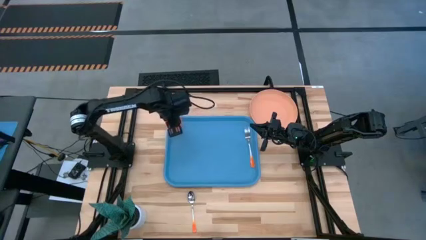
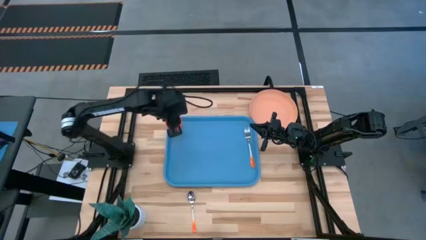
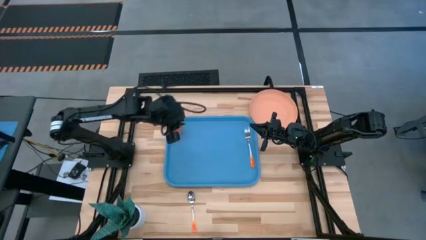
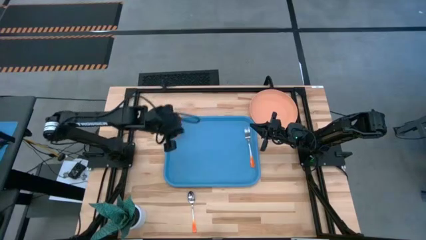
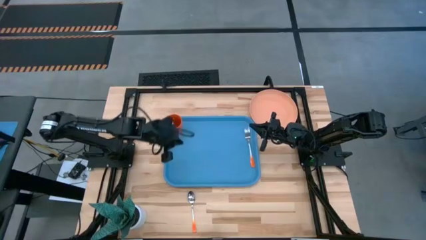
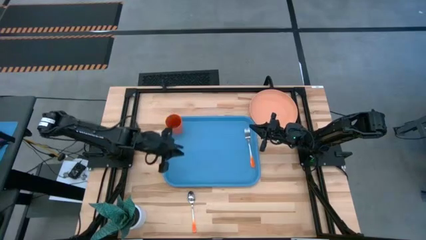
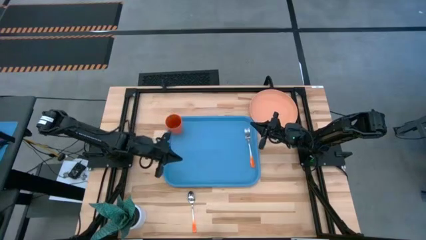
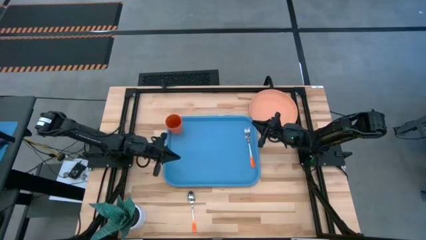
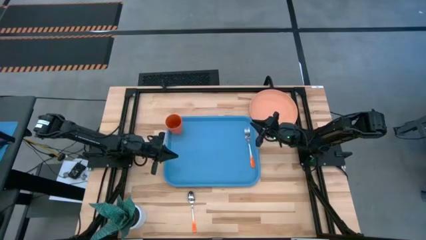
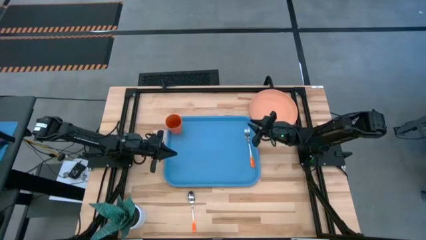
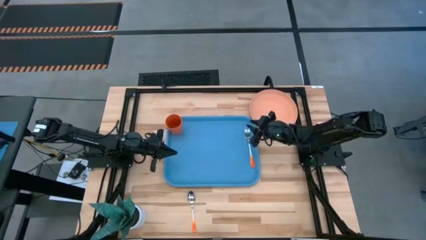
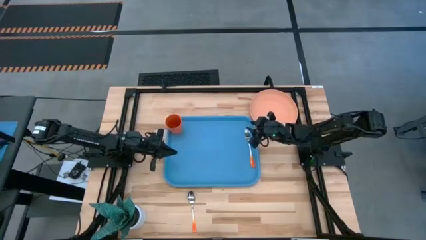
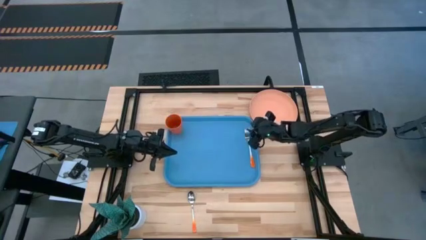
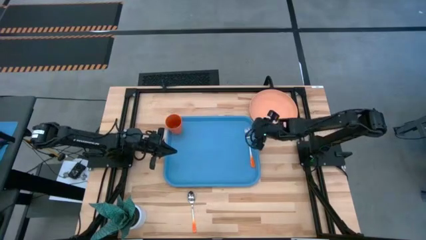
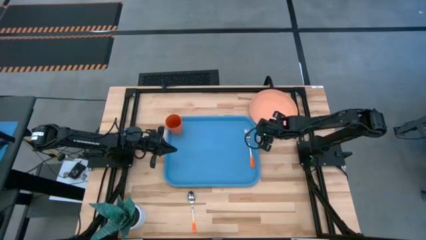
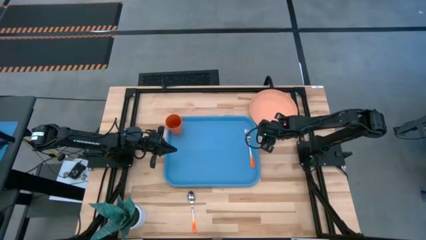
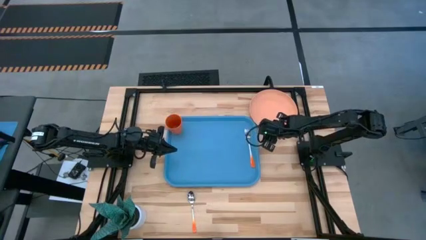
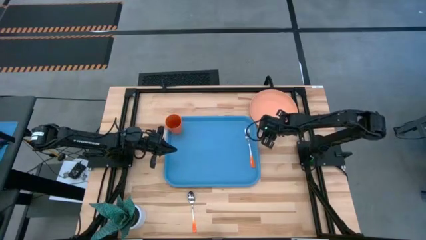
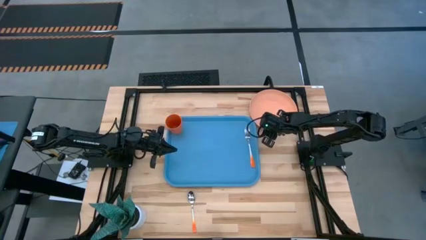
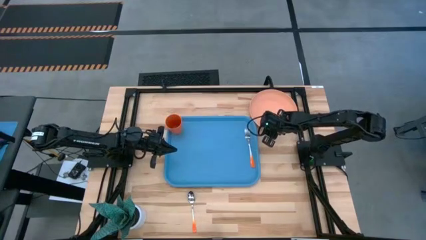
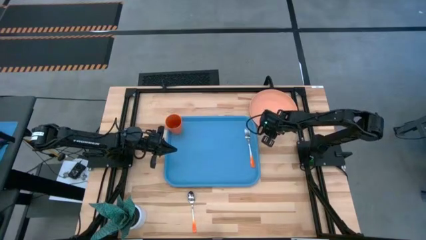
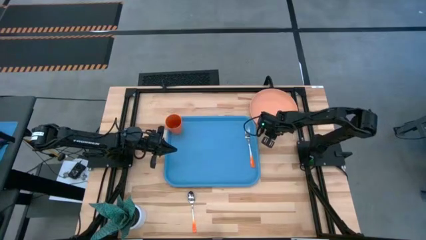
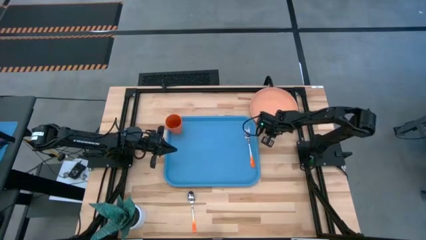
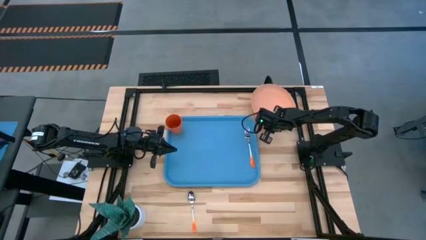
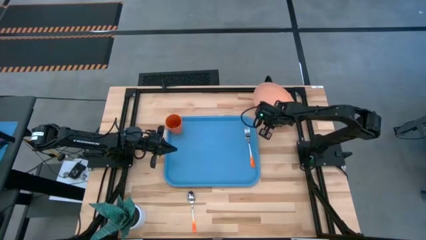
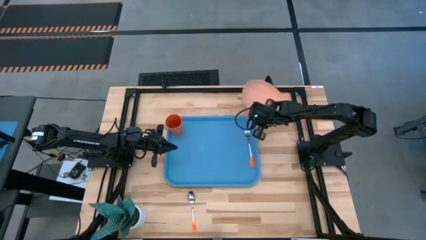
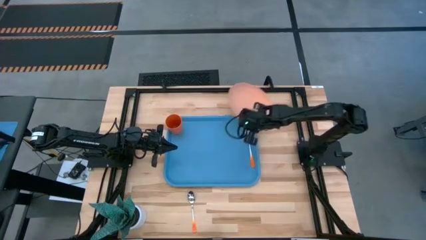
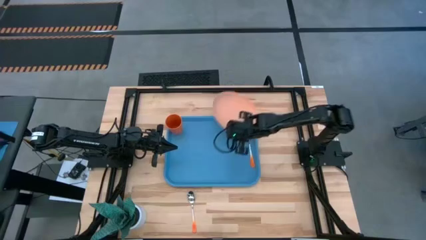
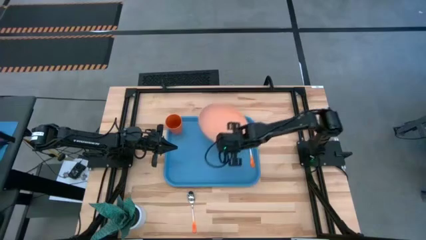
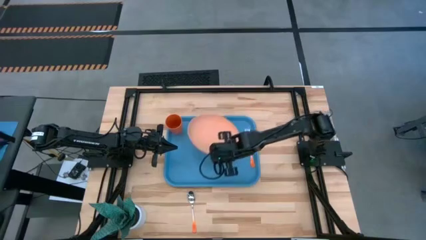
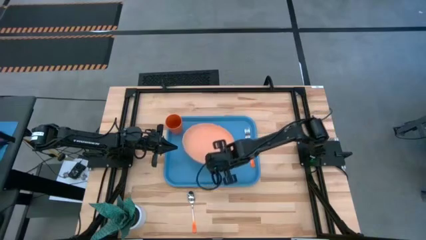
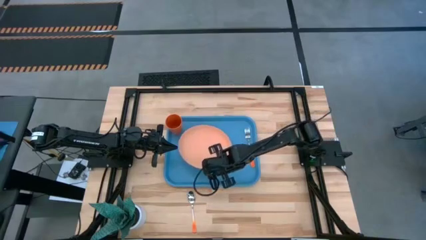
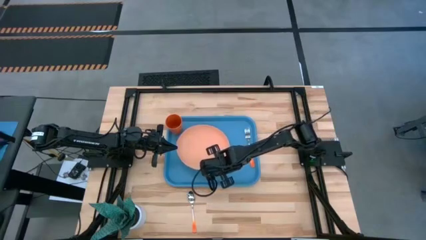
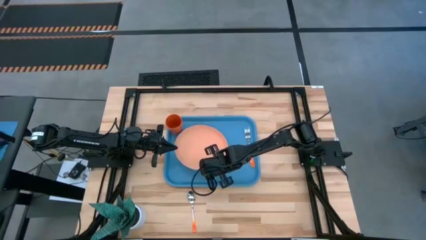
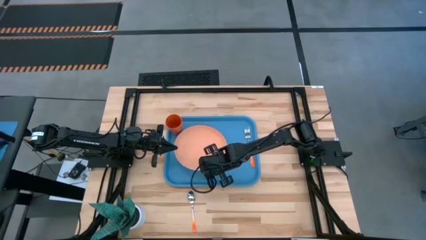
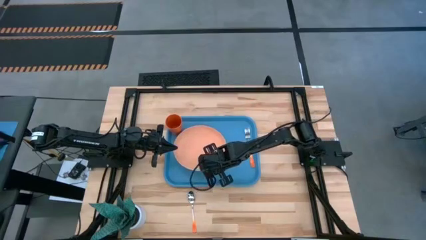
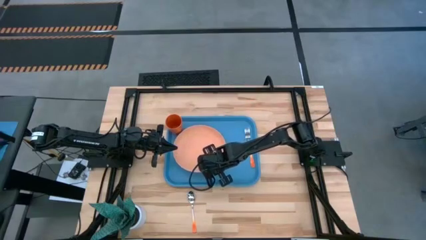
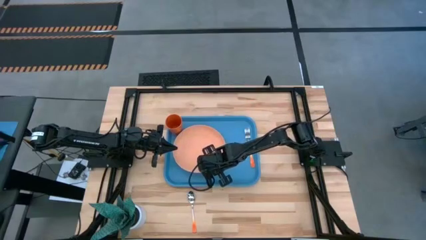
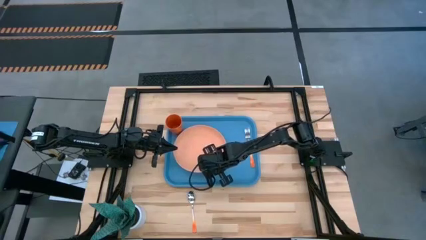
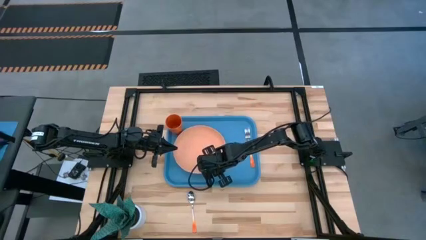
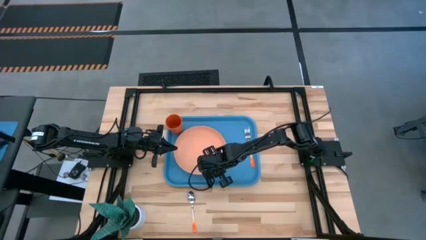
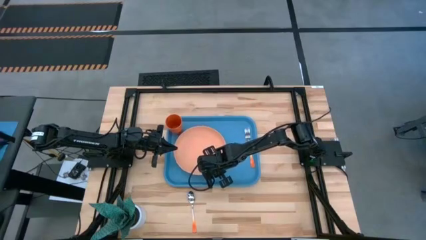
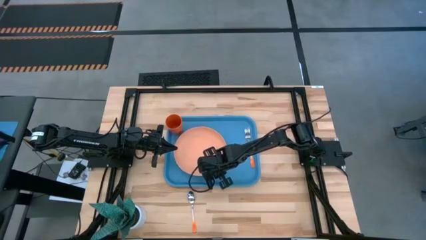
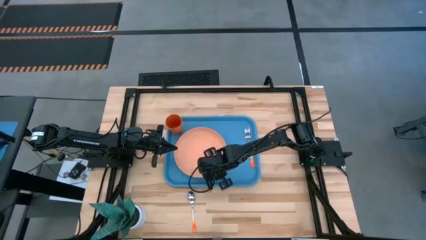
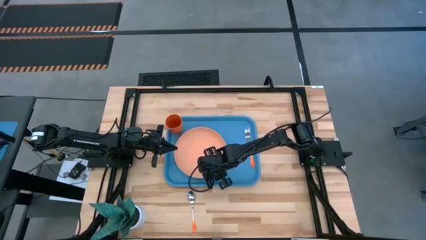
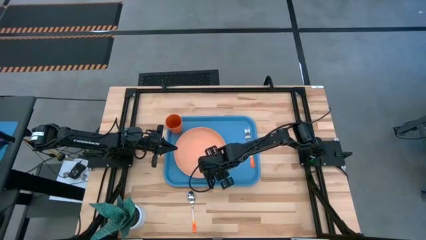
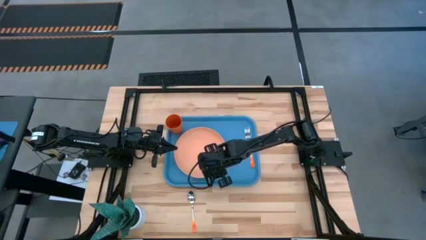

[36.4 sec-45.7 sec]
Task: Pick and place plate/cup/fork/spoon on tray
Put the orange plate on the blue serving tray

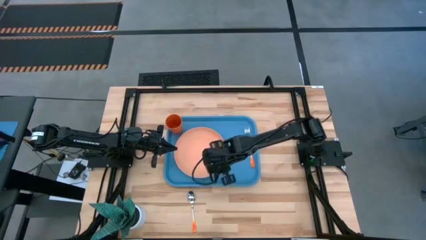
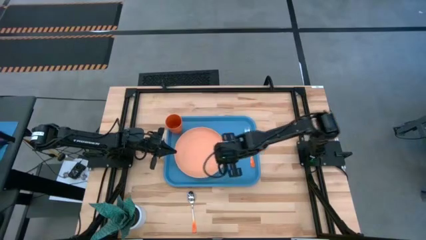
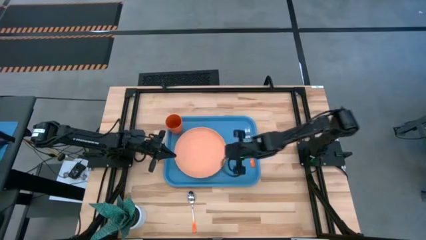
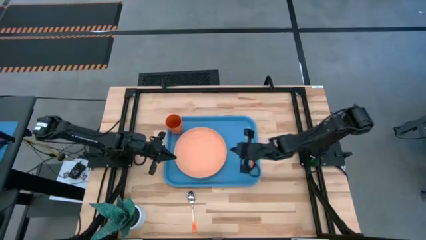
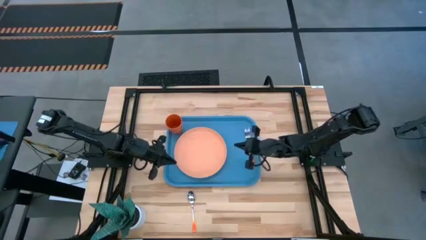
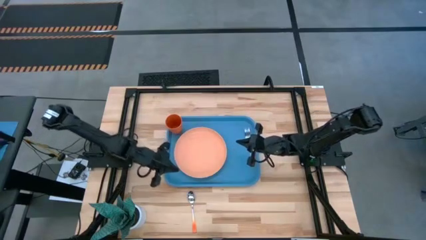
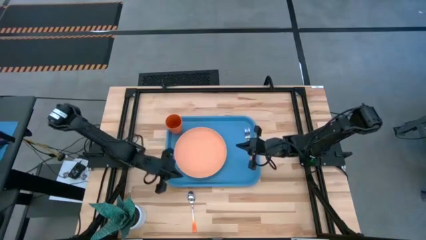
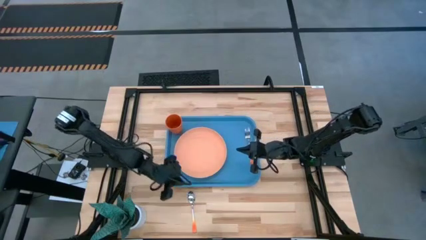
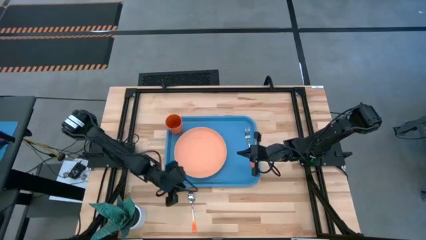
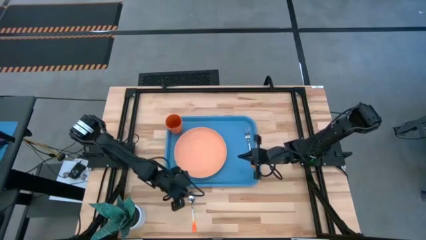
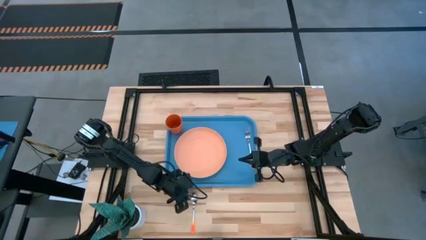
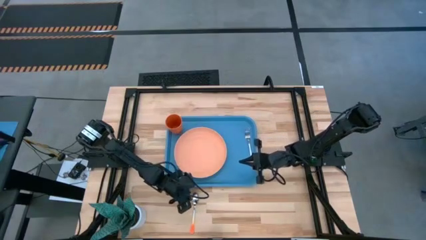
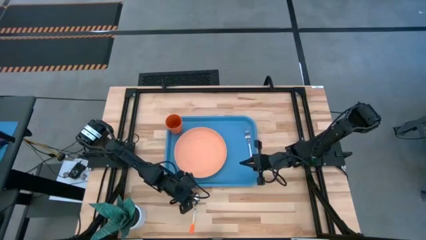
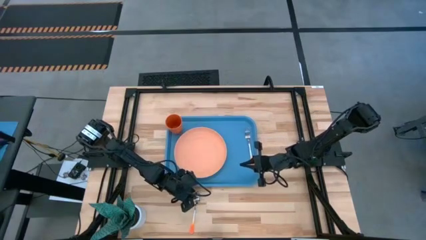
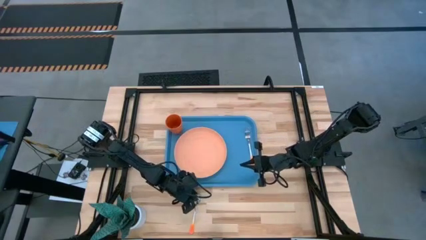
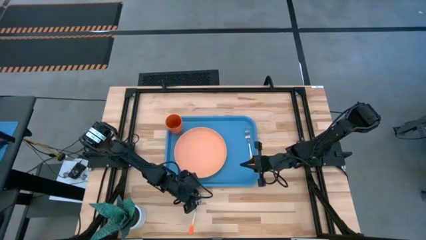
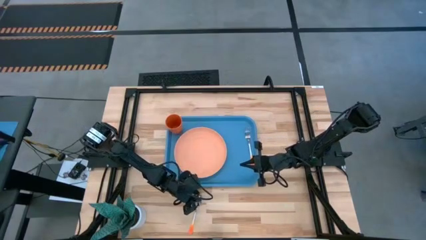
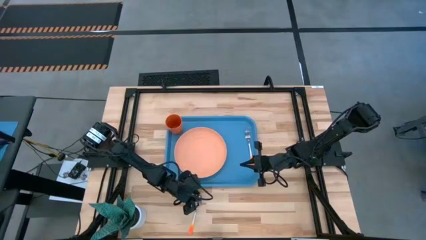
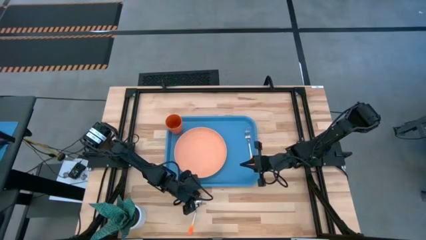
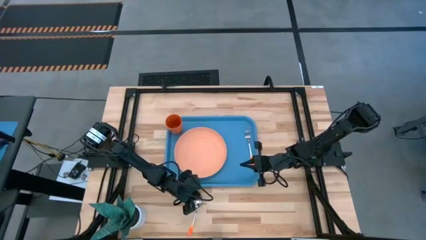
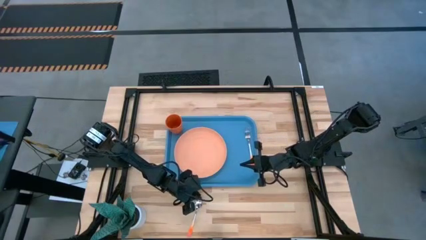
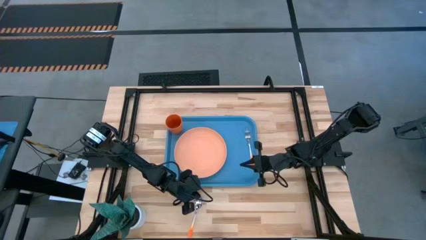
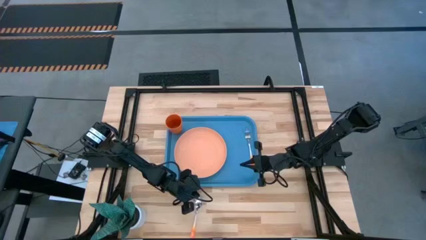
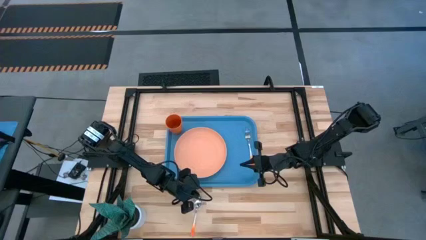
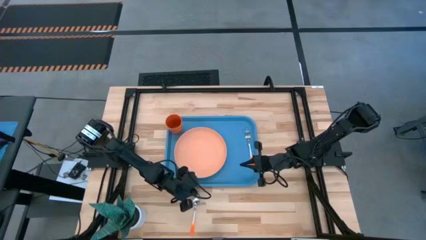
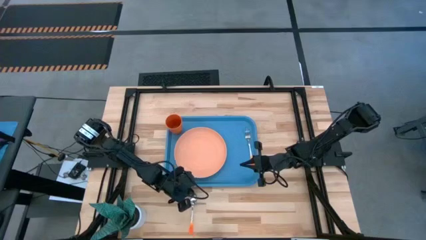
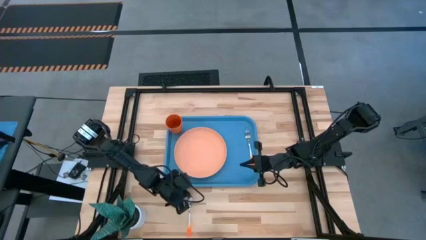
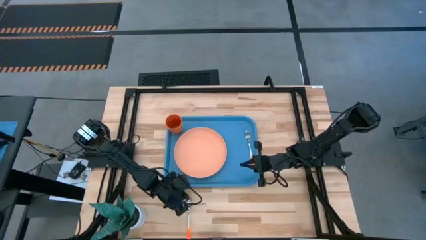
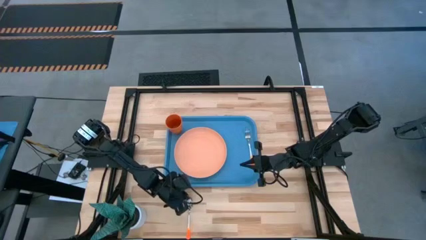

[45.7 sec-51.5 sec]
Put the orange spoon on the blue serving tray

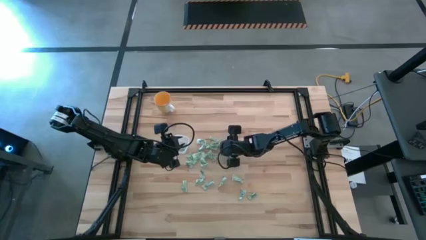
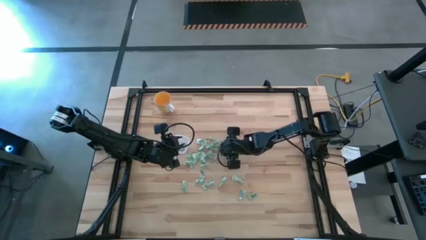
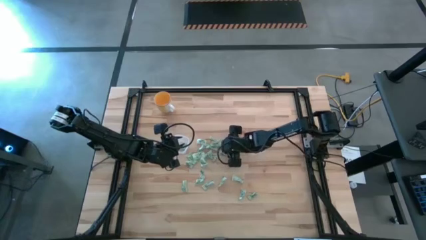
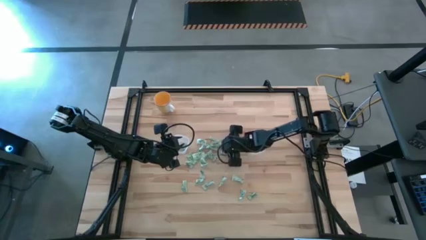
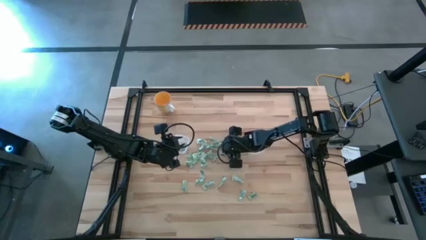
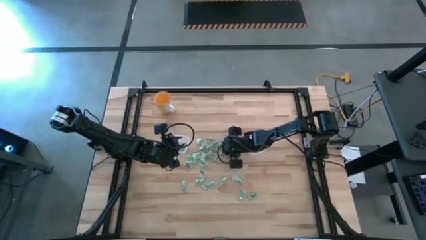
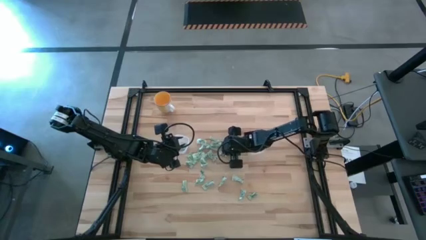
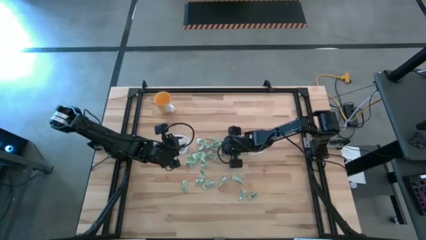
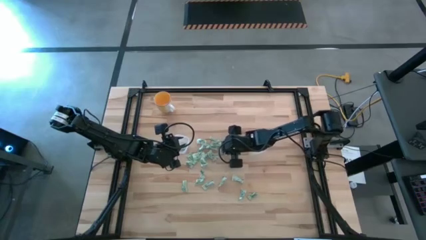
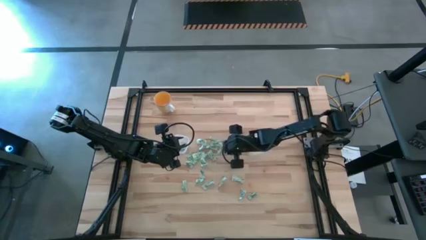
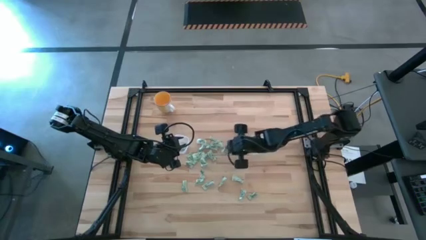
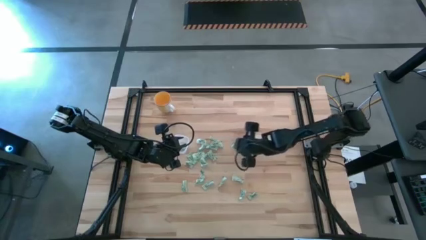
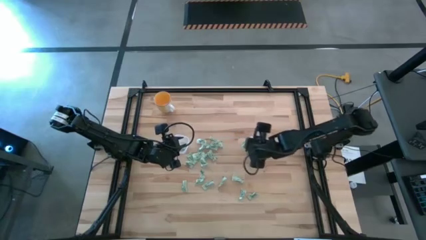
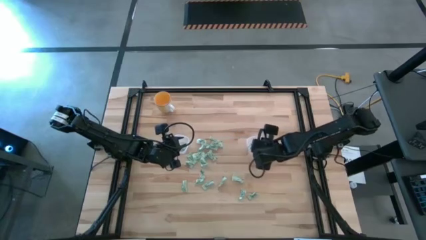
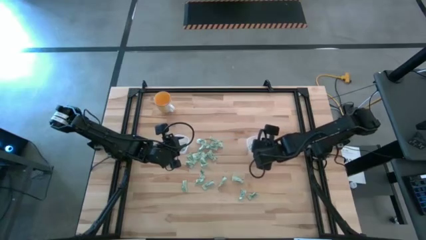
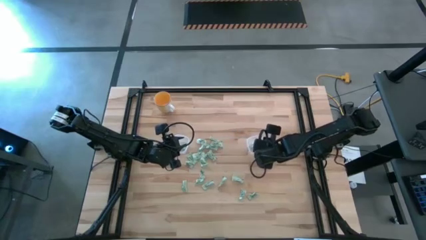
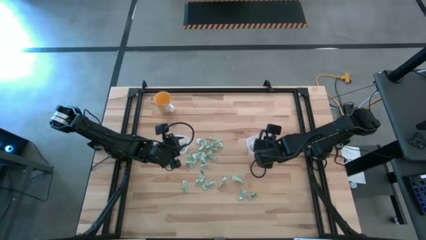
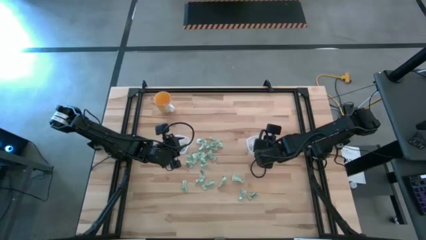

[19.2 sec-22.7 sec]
Task: Pick and place Stevia / Truvia into bins
Put the stevia packet into the right transparent container
